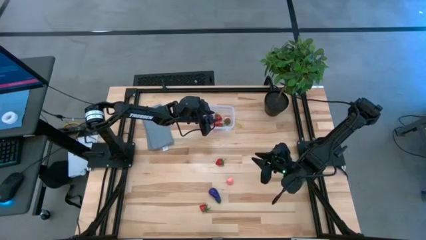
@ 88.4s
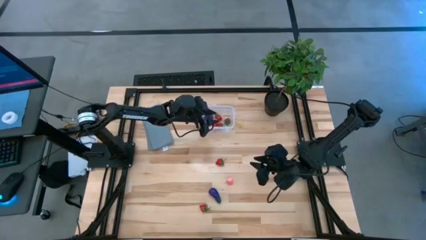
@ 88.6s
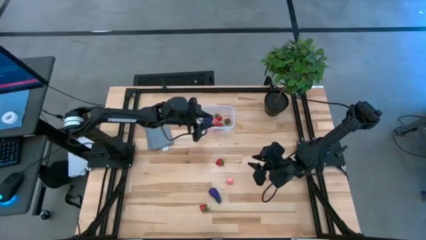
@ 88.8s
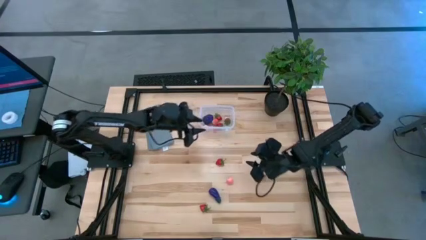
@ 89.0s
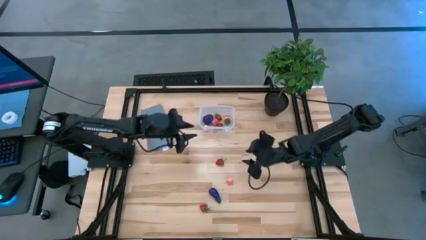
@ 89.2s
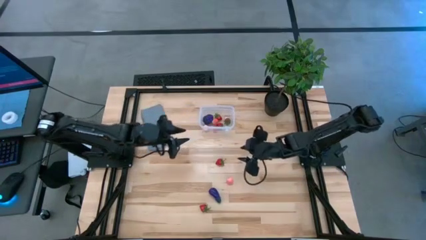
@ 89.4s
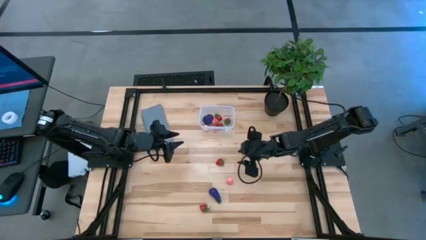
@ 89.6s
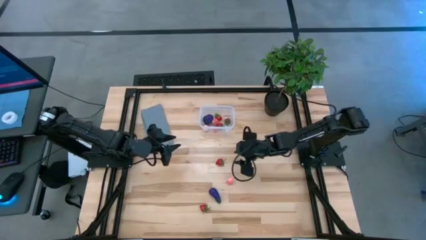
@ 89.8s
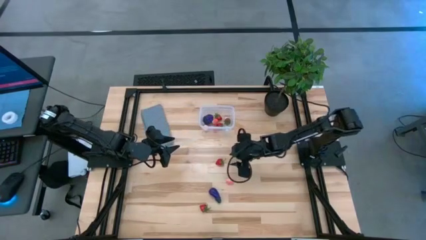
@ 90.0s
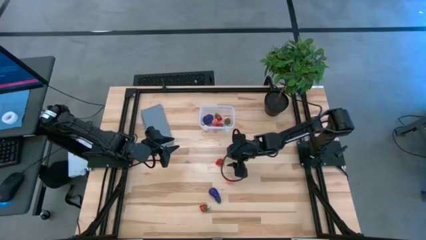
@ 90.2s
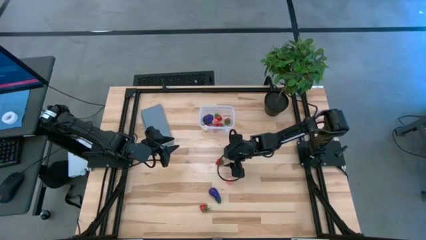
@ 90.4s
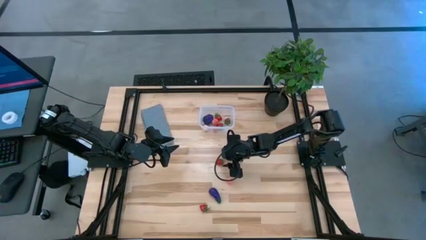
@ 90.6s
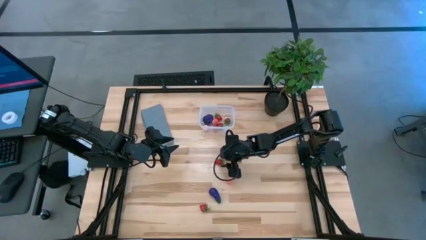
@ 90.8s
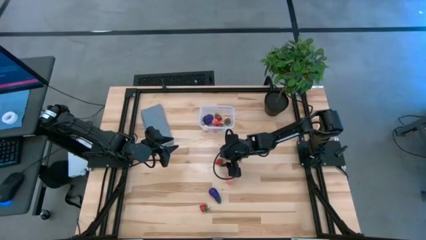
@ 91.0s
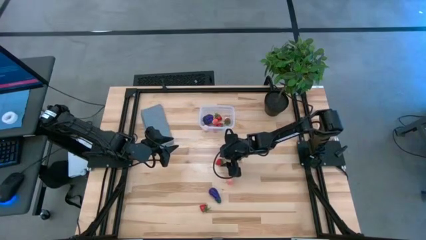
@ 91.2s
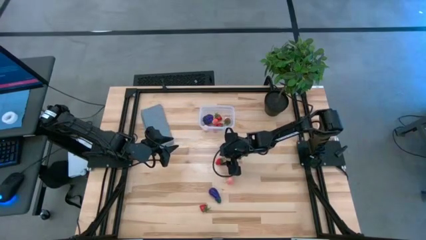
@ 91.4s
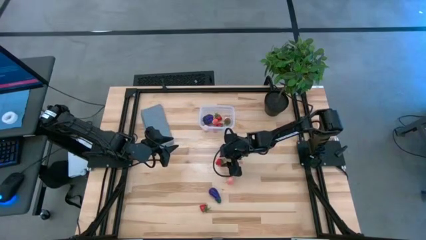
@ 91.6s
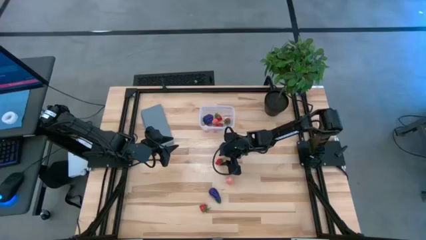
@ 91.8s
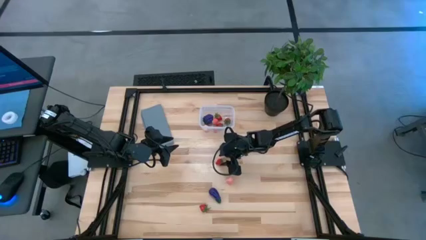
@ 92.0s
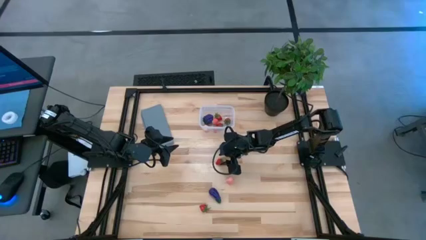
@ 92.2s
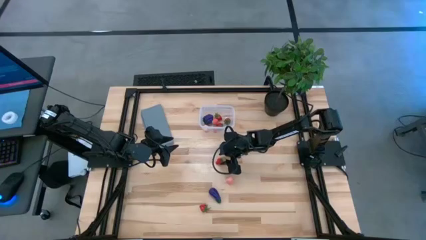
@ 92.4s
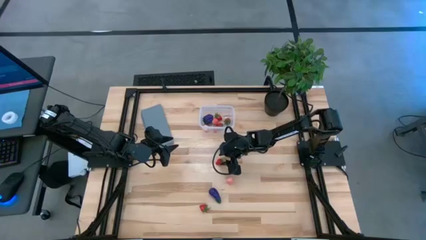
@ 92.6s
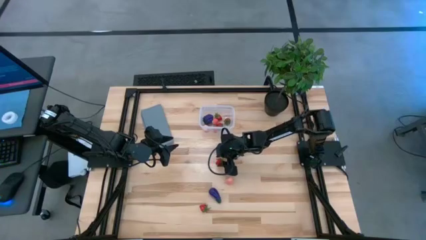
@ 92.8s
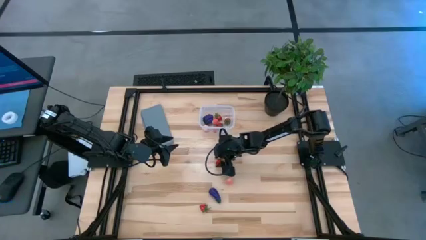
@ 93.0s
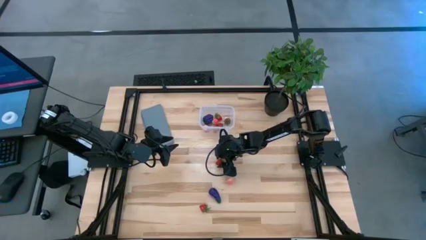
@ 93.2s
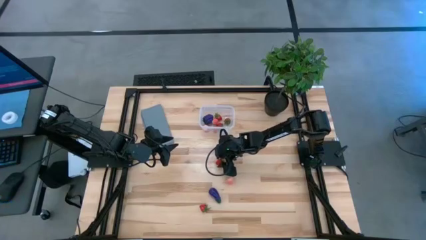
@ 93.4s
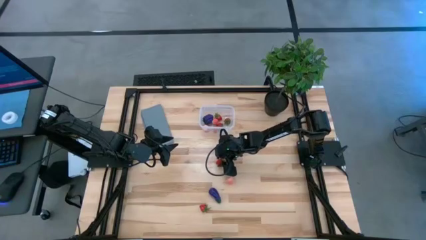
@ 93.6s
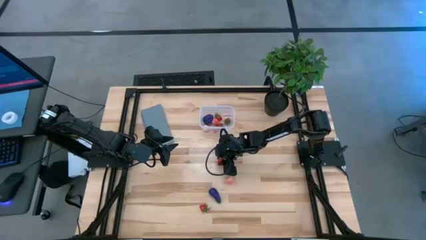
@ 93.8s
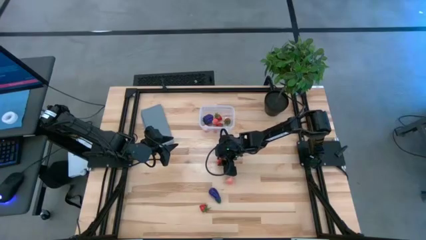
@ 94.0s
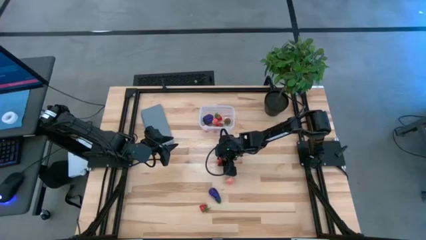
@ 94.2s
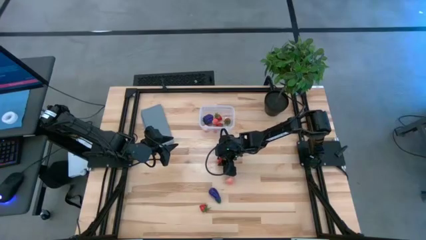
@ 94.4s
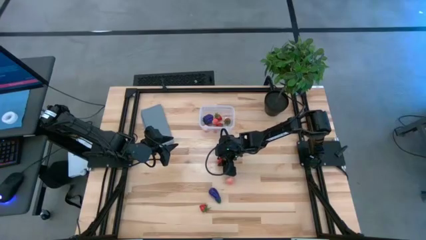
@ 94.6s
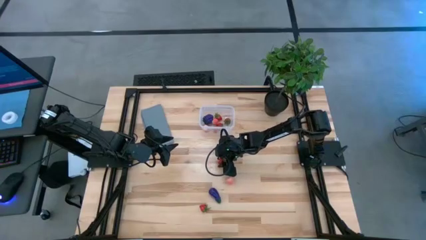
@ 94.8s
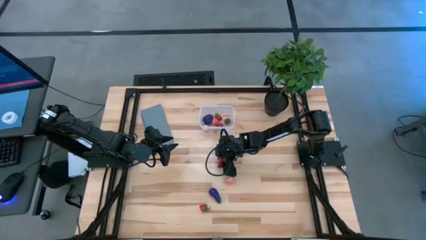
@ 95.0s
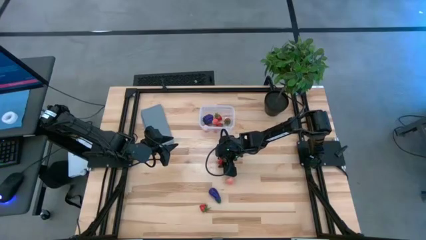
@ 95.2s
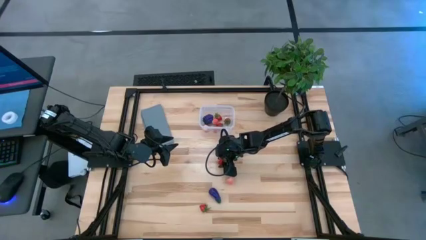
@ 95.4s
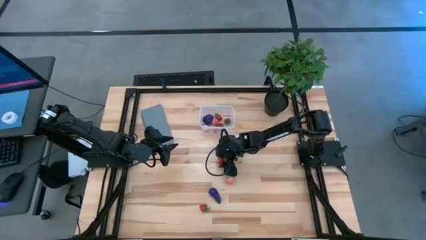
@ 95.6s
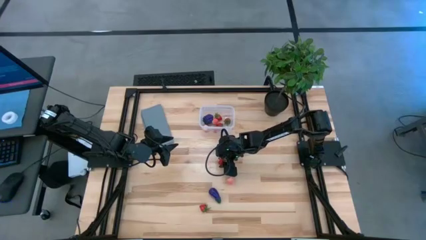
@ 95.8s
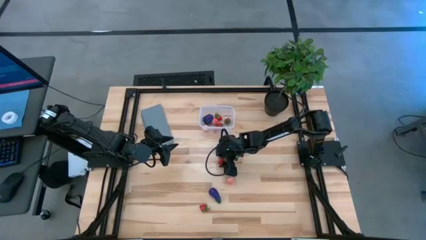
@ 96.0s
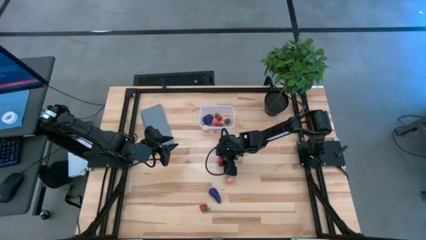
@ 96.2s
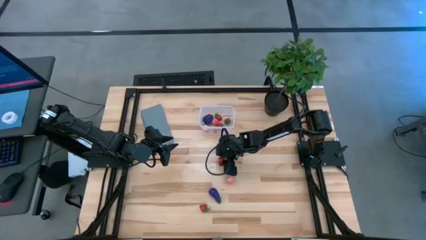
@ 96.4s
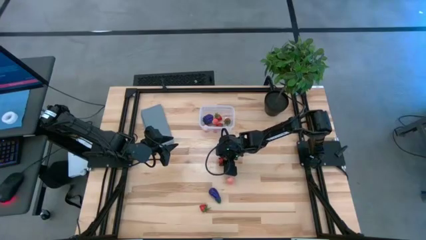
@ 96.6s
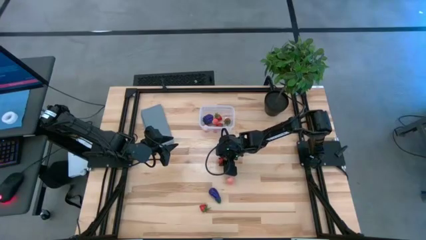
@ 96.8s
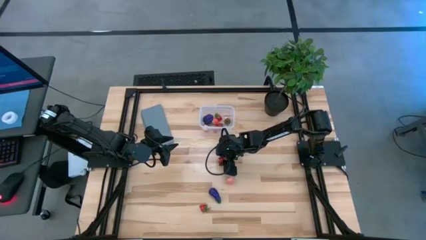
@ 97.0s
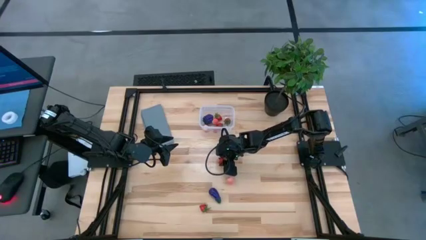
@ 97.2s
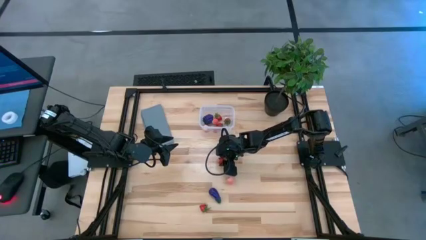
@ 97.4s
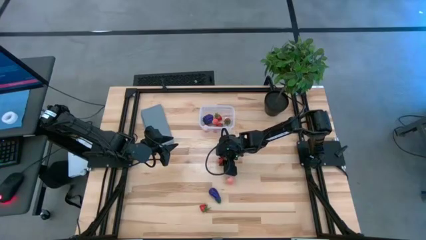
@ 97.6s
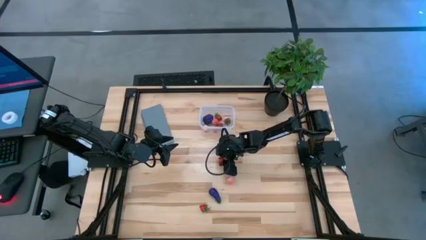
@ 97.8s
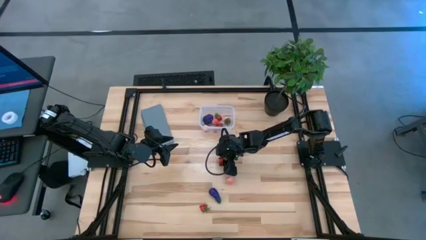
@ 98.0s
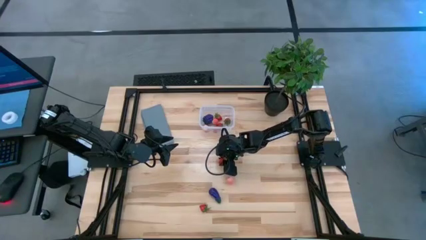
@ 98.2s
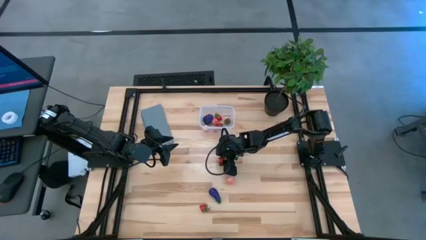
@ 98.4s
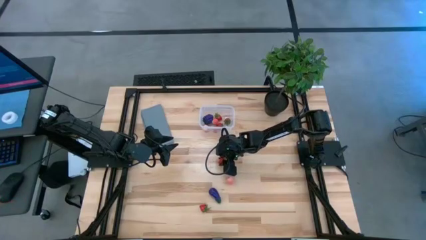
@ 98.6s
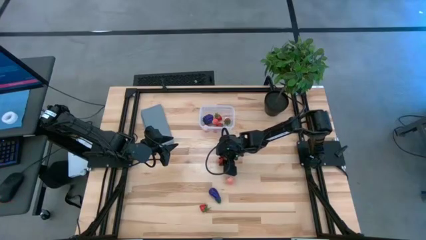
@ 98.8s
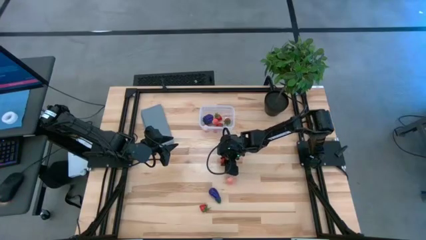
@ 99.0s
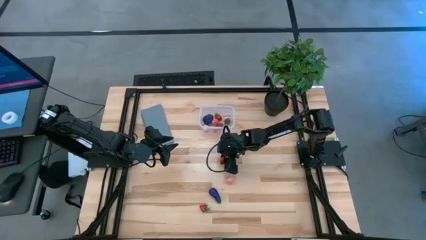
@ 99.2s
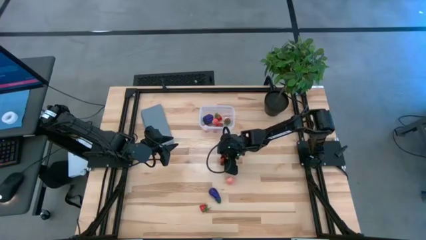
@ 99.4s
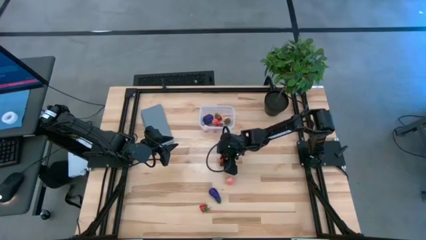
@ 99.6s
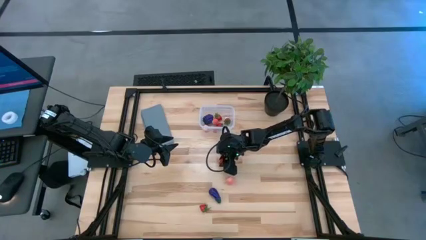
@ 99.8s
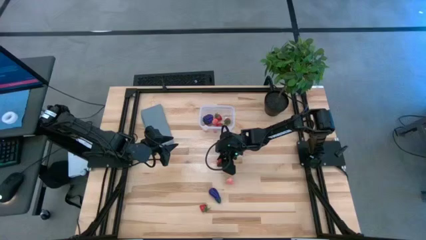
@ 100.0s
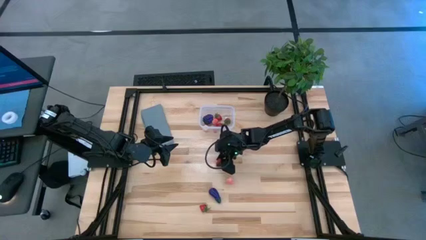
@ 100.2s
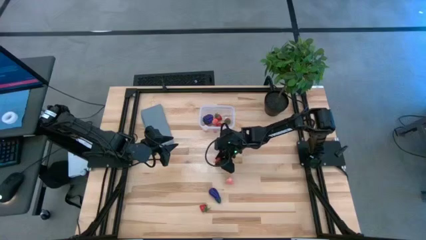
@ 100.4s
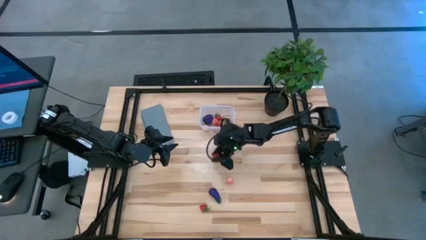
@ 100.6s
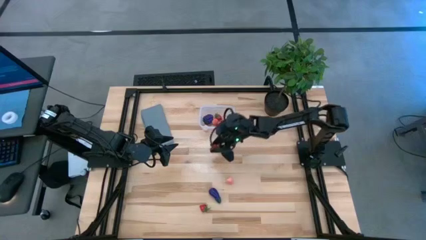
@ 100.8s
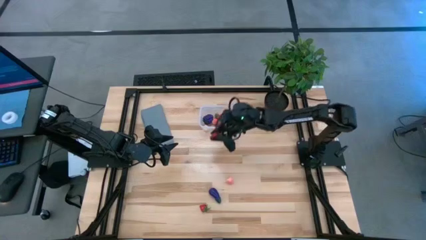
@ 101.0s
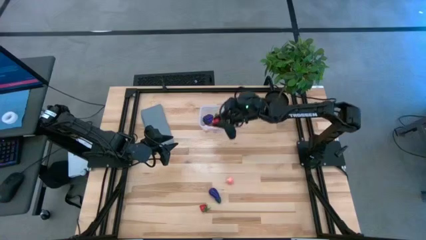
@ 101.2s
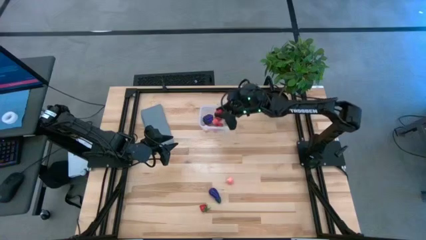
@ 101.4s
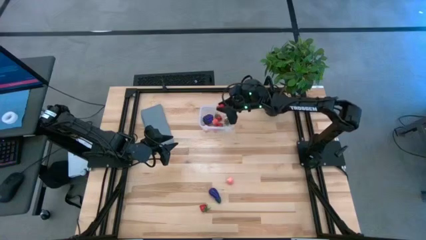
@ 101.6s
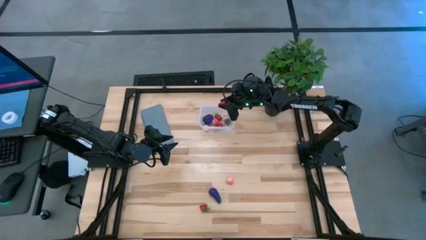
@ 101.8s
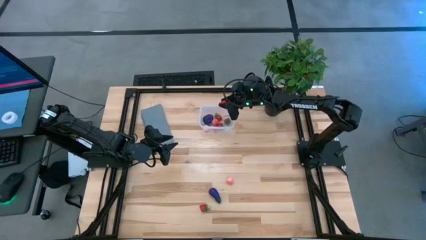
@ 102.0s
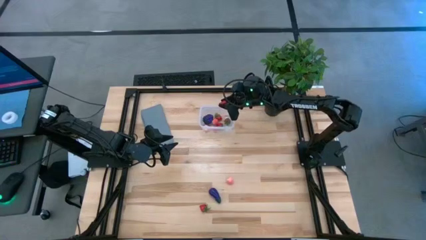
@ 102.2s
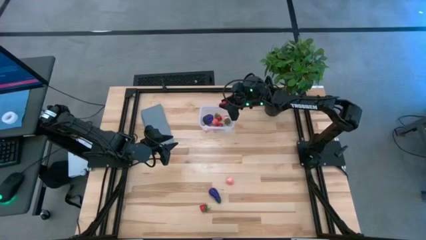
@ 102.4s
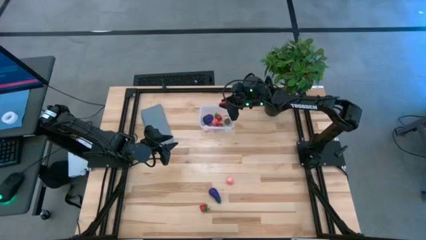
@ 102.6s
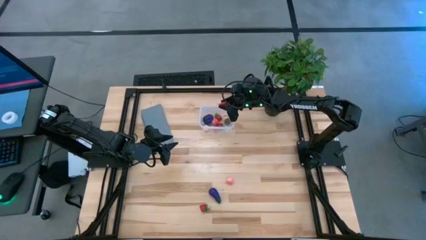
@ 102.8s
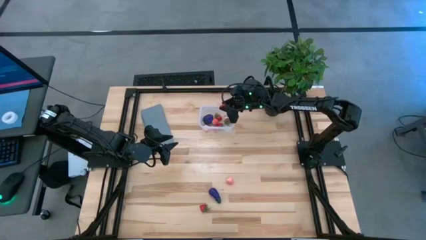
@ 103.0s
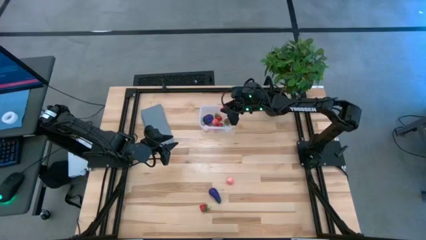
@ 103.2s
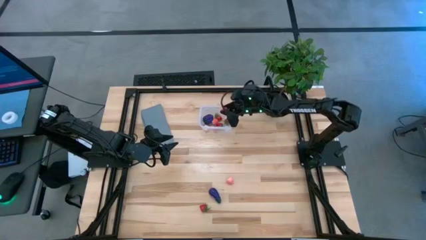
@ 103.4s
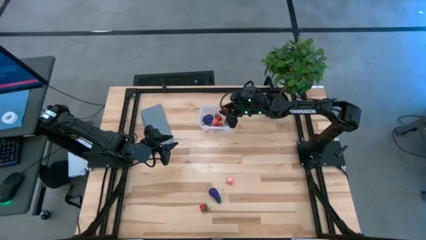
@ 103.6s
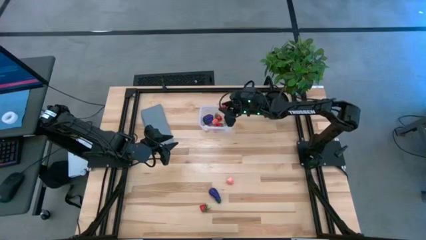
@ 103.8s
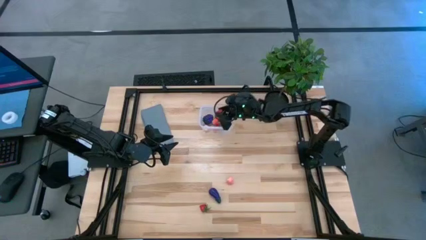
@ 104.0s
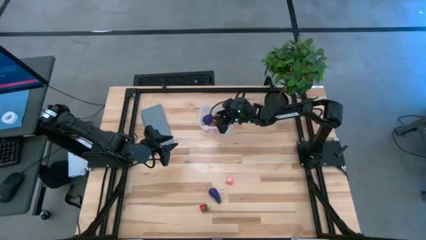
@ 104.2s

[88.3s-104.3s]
Task: Pick and placing Produce into tupperware
Put the strawberry into the transparent bin
